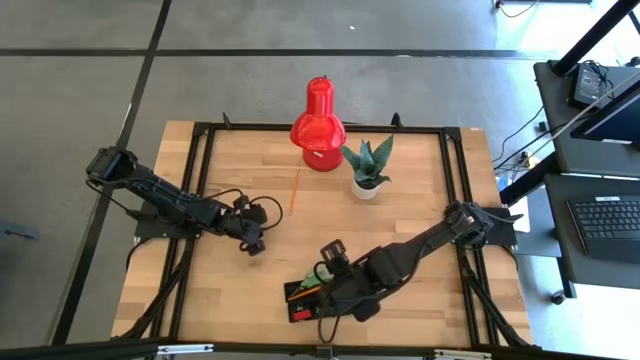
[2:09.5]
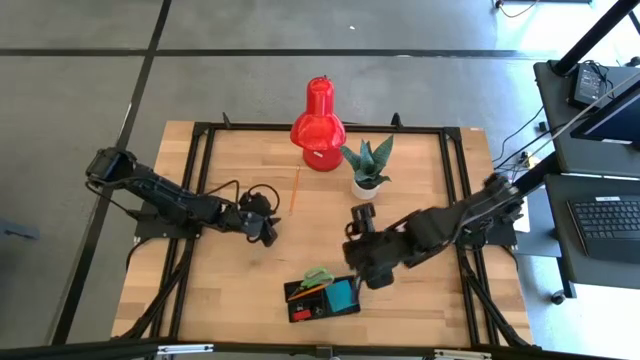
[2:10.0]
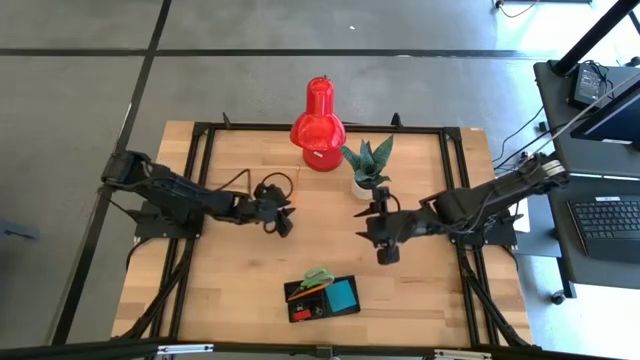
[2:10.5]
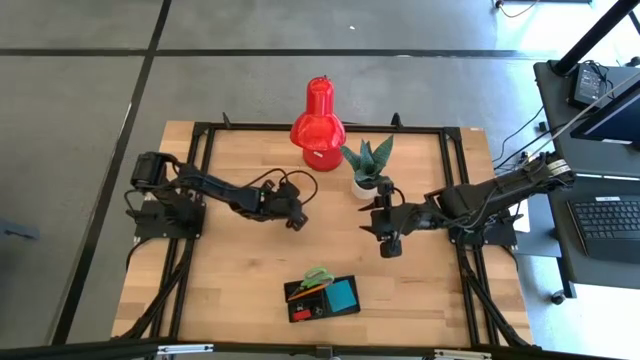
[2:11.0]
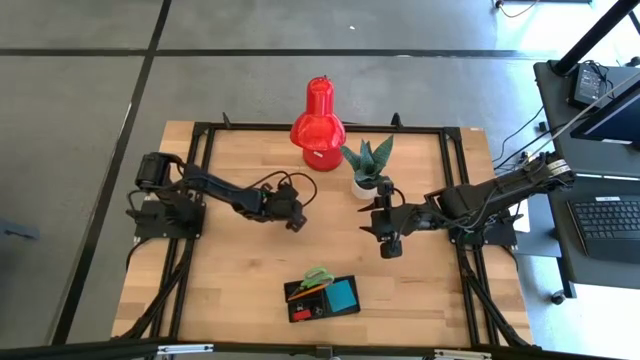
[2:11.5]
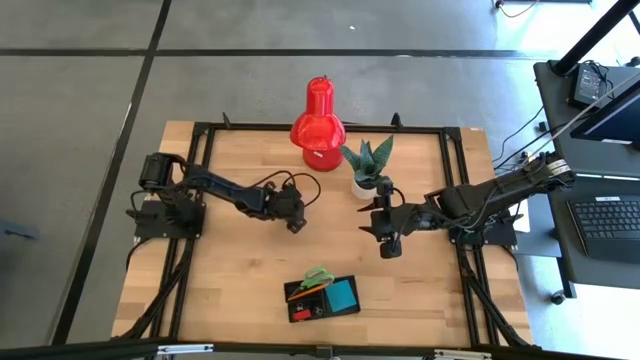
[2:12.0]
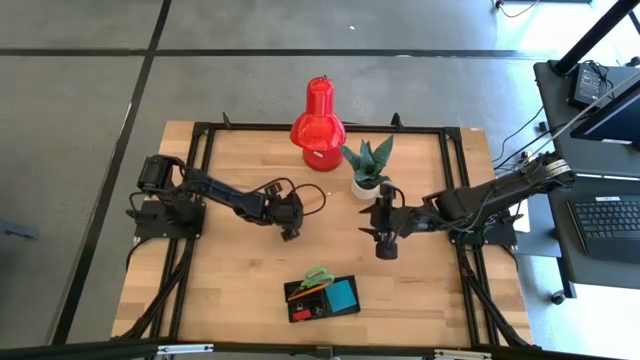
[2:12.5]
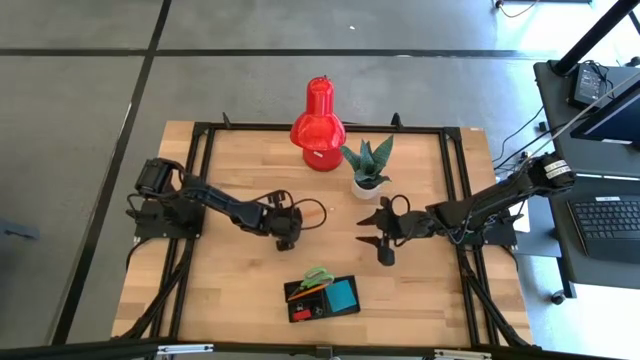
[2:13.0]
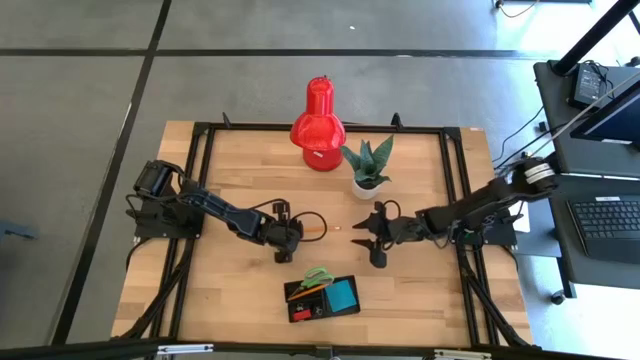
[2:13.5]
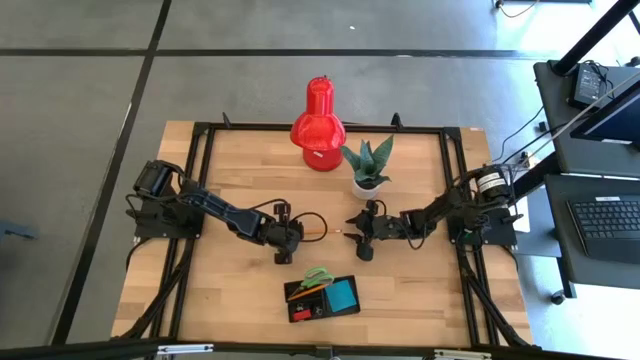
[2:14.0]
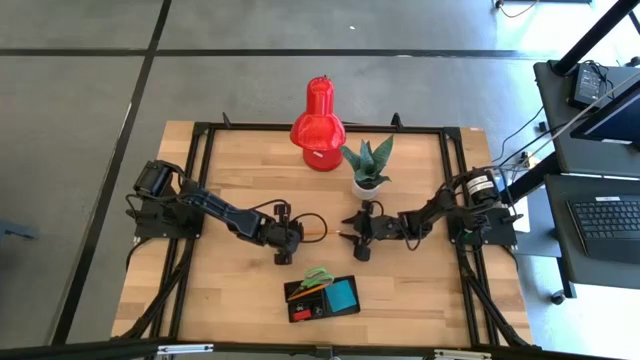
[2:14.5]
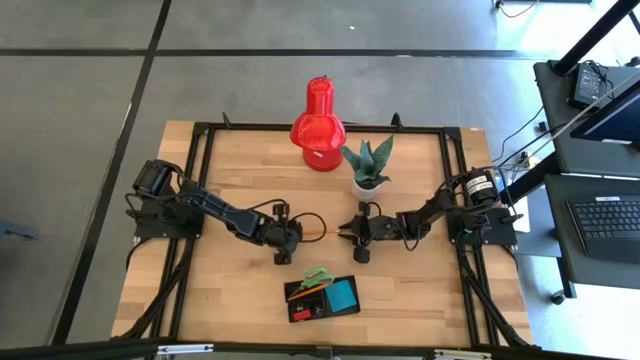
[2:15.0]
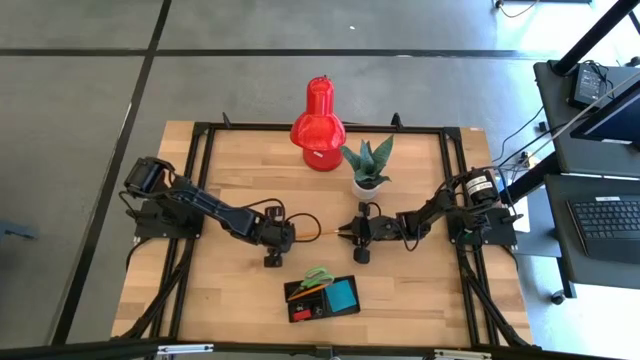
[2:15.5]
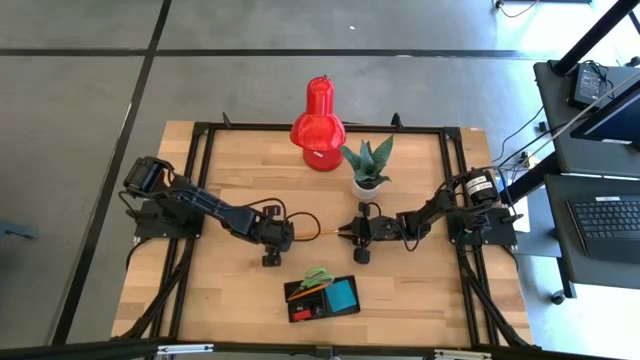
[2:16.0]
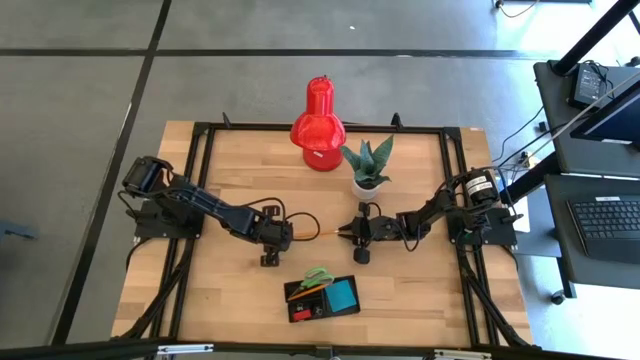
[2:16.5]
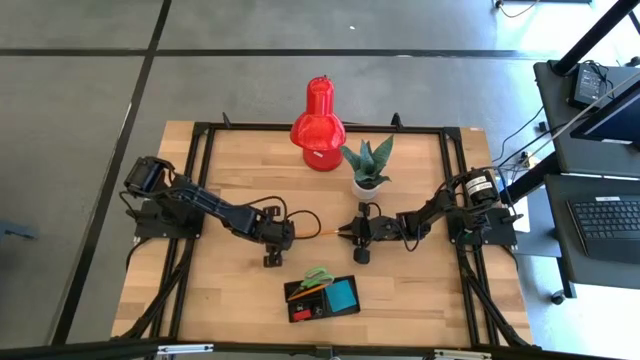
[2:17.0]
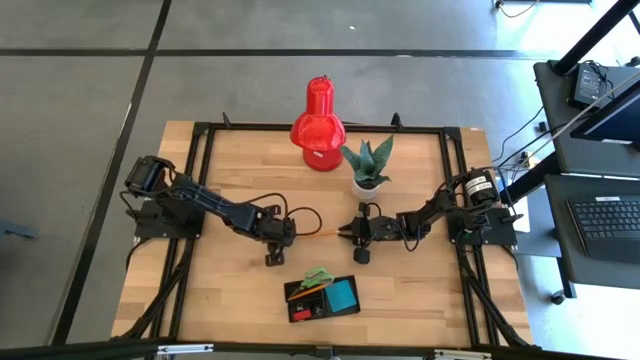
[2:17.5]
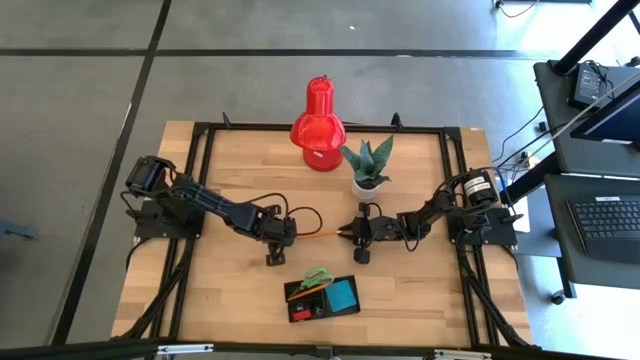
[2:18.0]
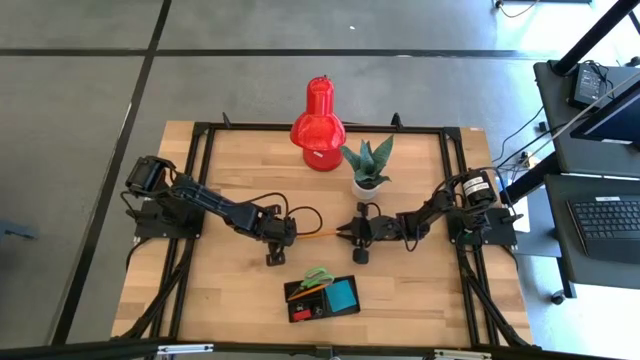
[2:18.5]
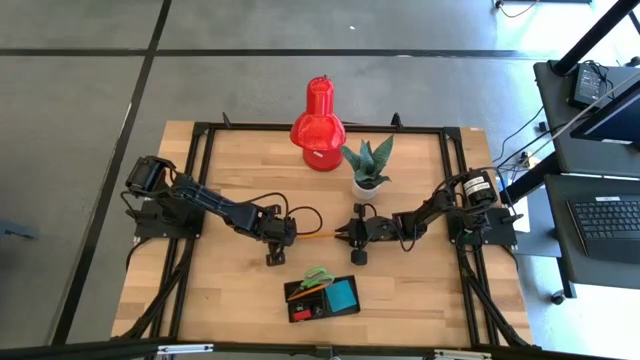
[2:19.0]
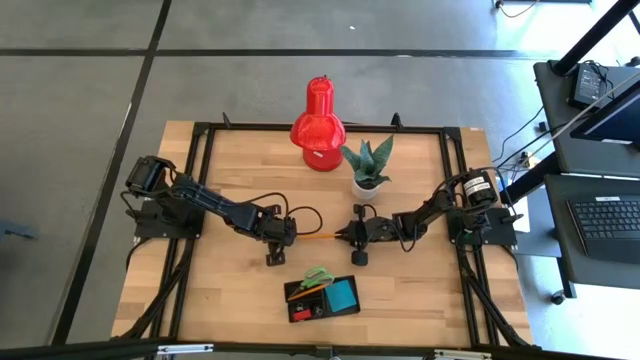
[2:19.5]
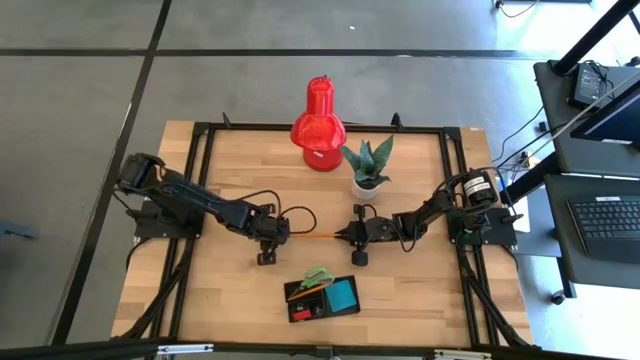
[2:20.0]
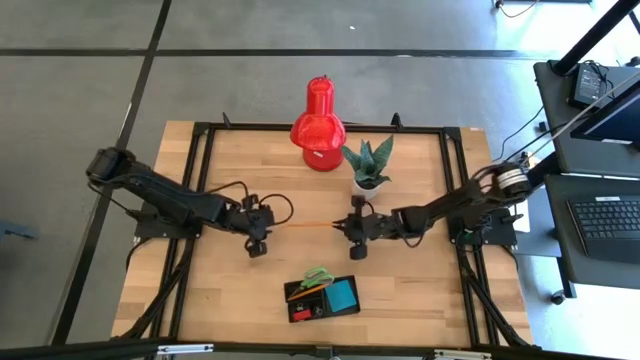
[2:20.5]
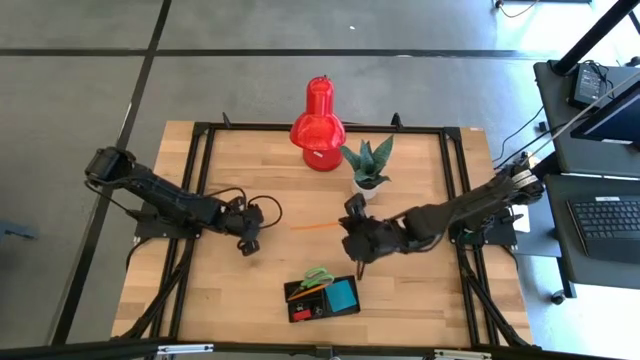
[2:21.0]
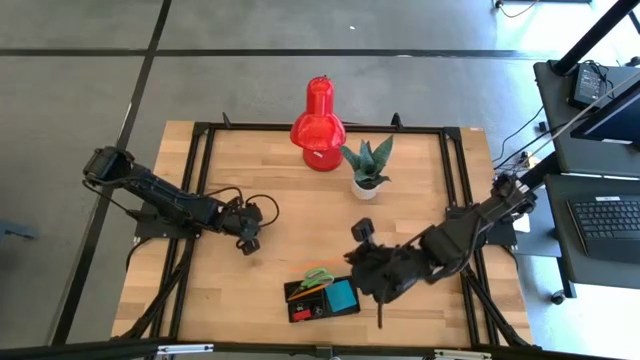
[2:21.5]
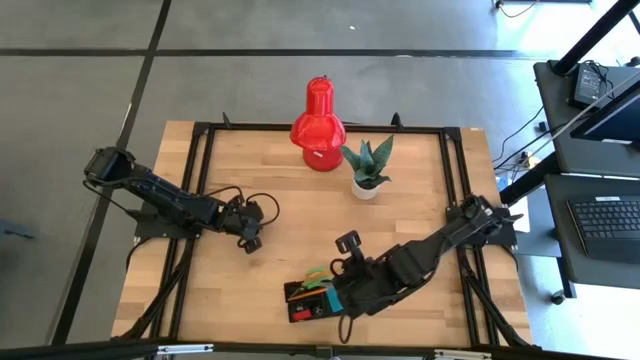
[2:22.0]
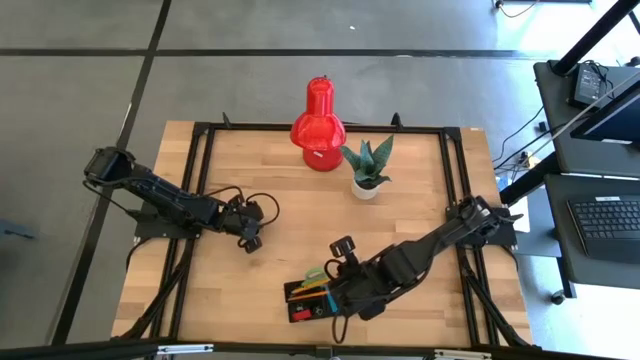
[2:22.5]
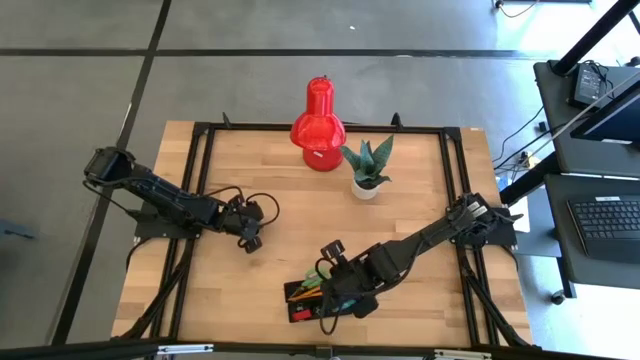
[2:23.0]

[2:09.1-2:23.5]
Task: Pick and place office supplies into organizer
Put the yellow pencil into the desk organizer

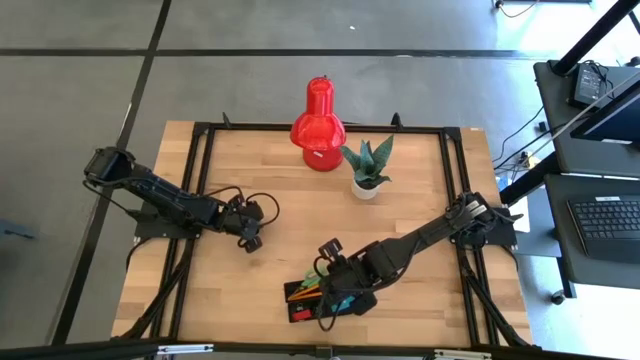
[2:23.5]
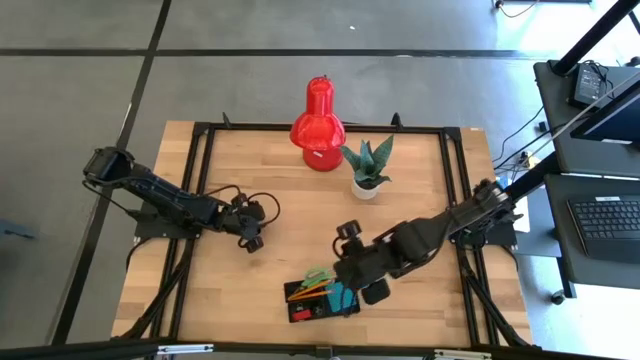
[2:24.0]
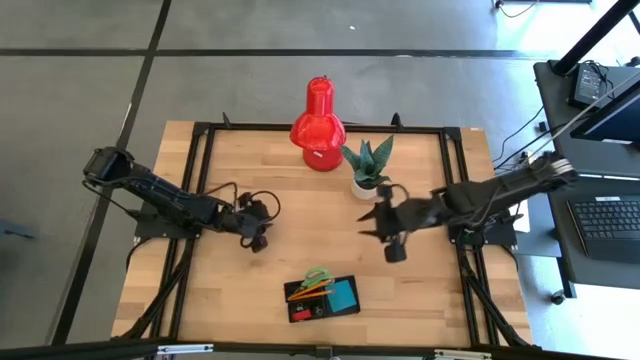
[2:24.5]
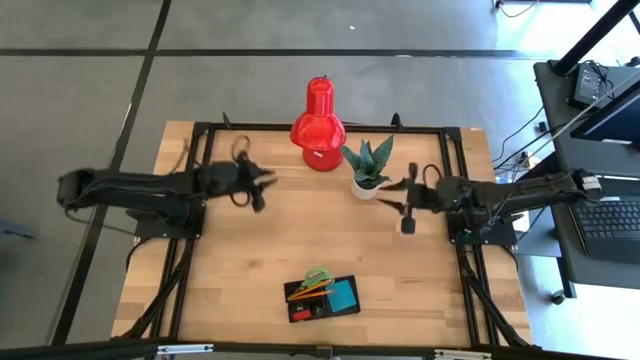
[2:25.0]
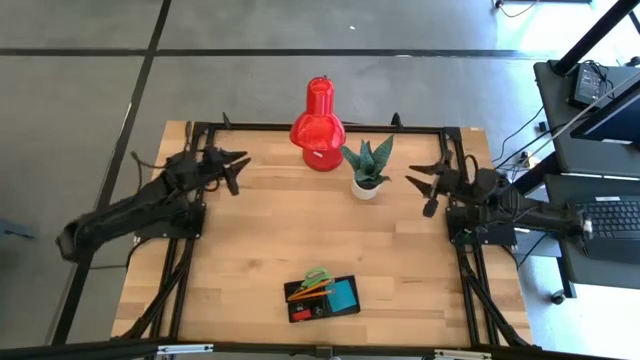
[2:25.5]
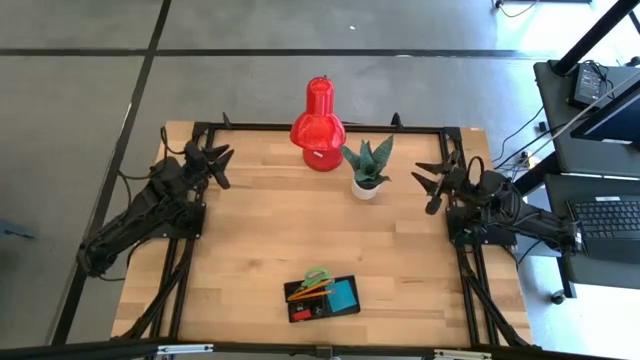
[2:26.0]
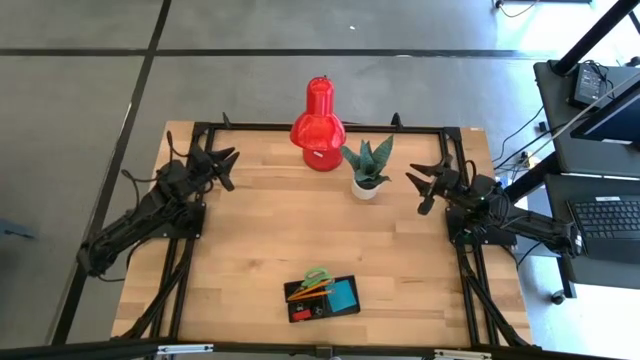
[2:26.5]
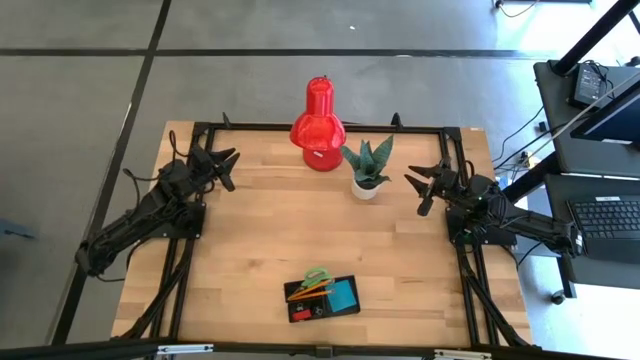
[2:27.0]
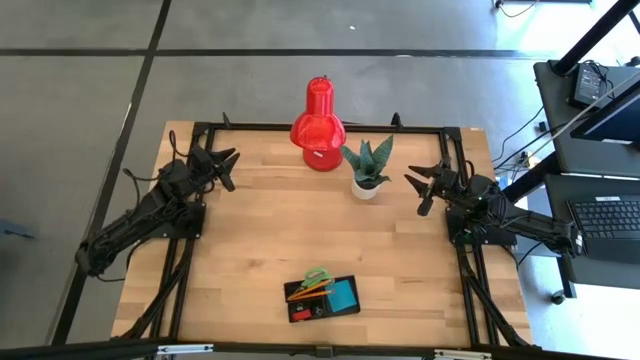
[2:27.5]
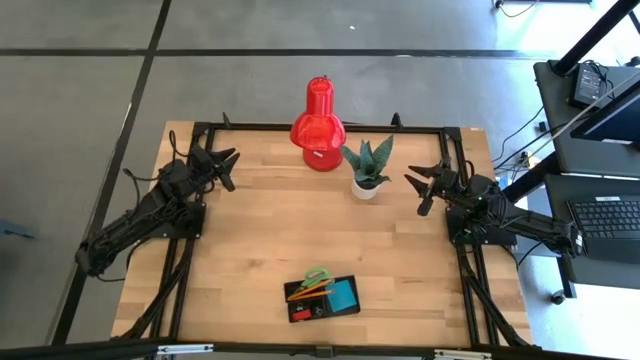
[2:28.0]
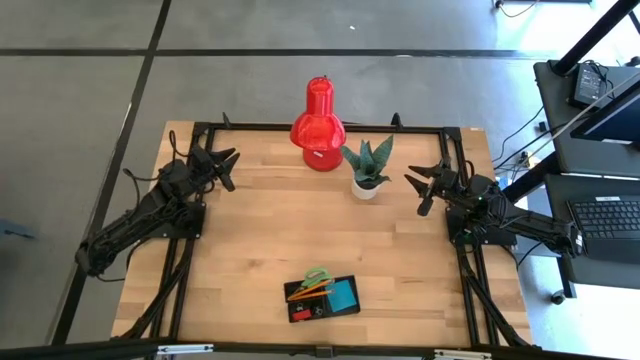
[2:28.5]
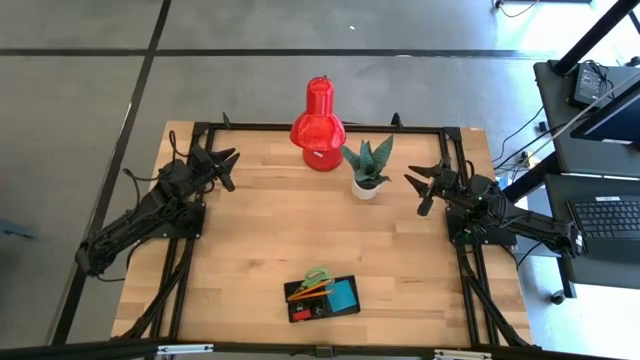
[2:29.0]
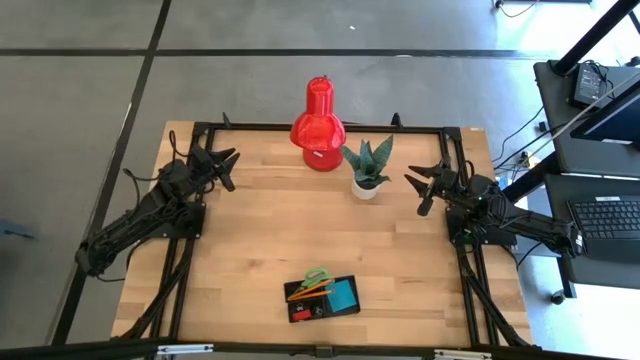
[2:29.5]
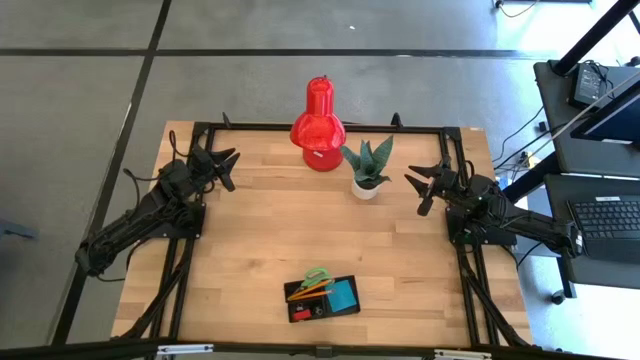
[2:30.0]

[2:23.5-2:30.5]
Return to Home Position

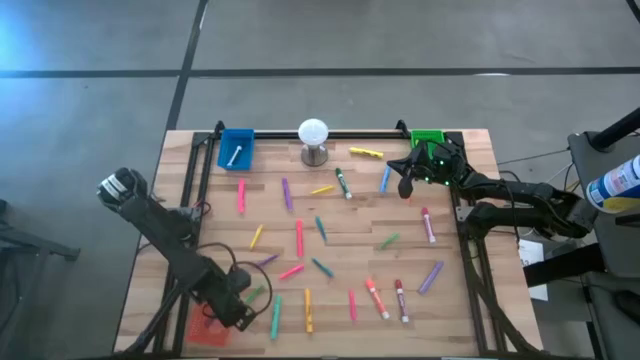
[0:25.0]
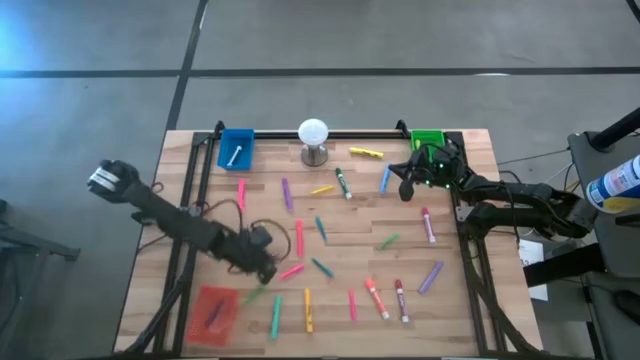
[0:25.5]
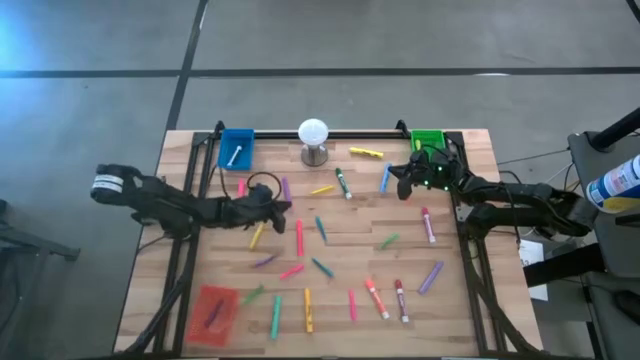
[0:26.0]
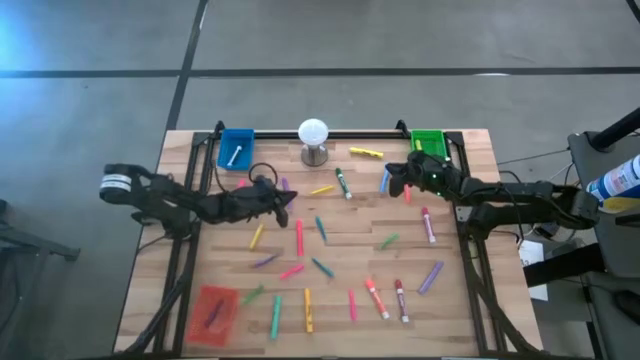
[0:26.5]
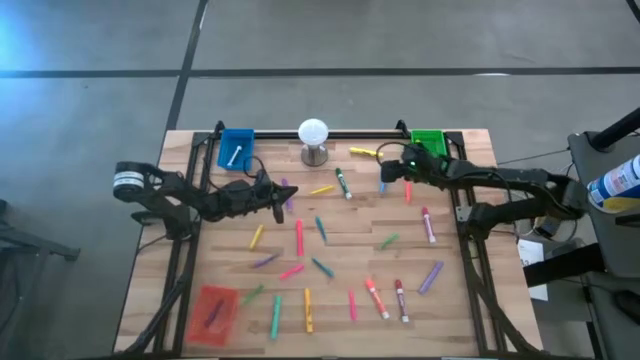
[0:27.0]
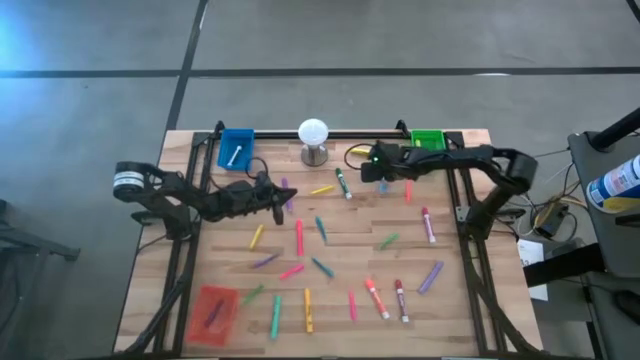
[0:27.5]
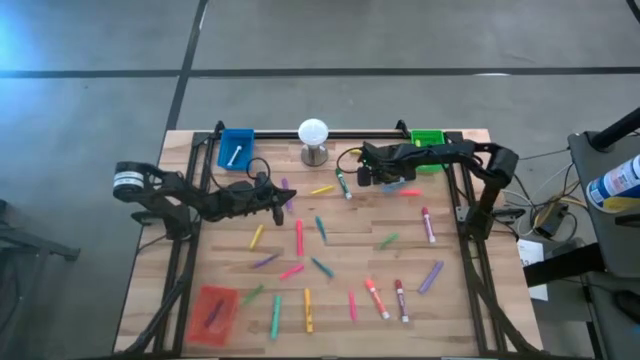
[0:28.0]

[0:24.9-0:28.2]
Task: Pick & Place Markers
Put the blue highlighter pen into the green bin
